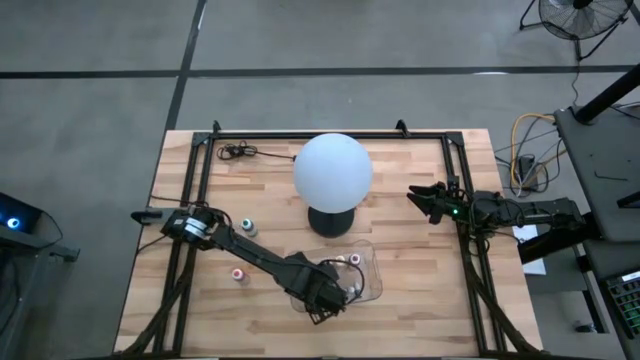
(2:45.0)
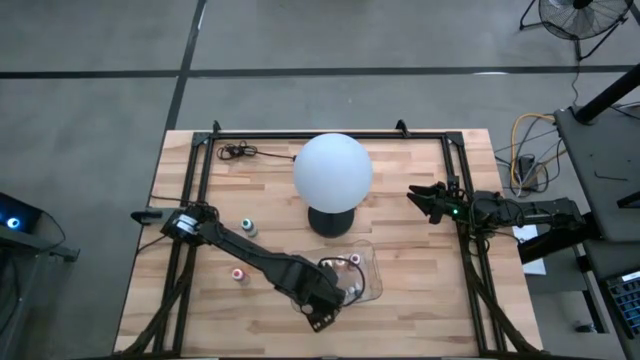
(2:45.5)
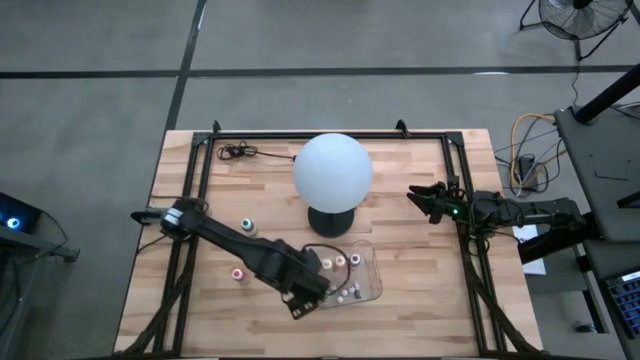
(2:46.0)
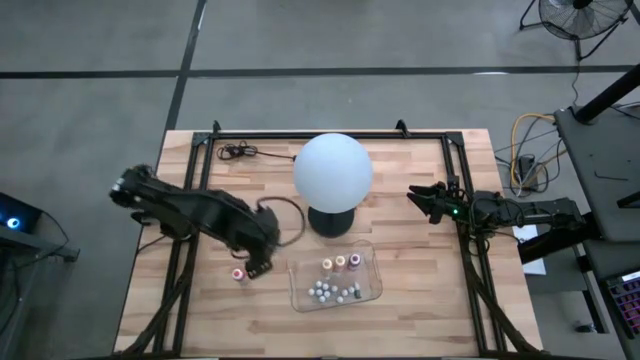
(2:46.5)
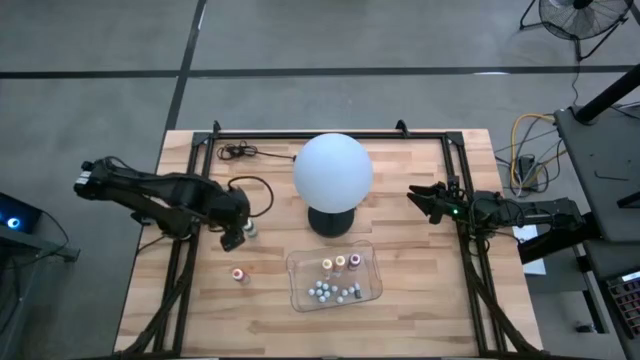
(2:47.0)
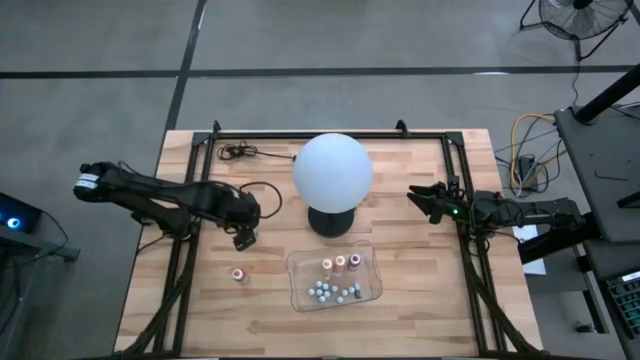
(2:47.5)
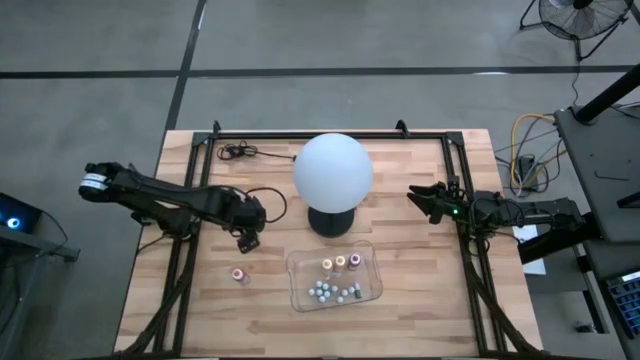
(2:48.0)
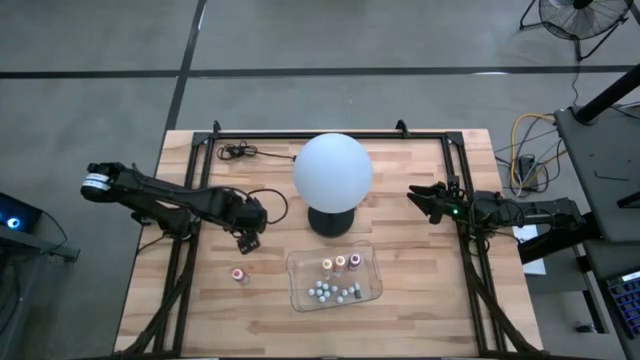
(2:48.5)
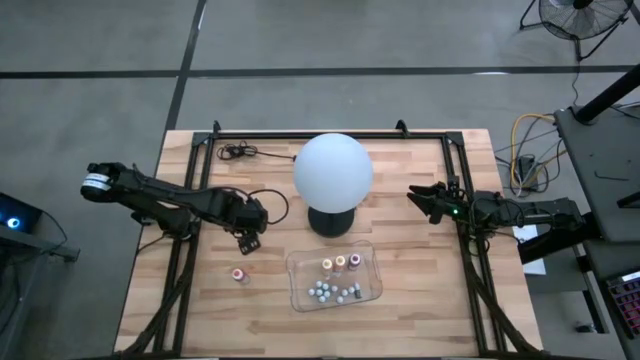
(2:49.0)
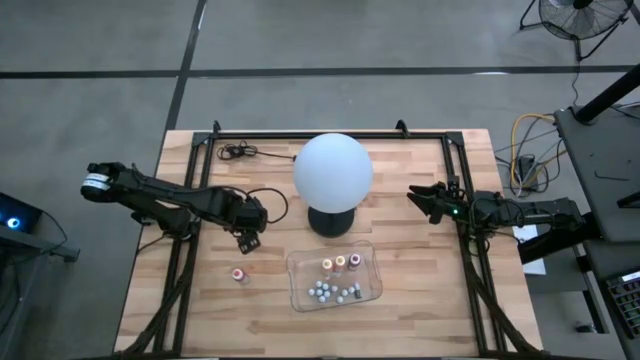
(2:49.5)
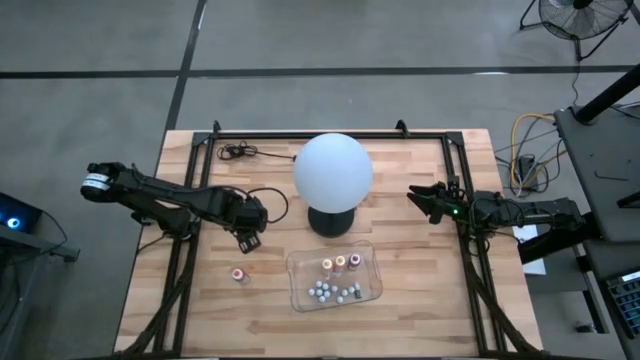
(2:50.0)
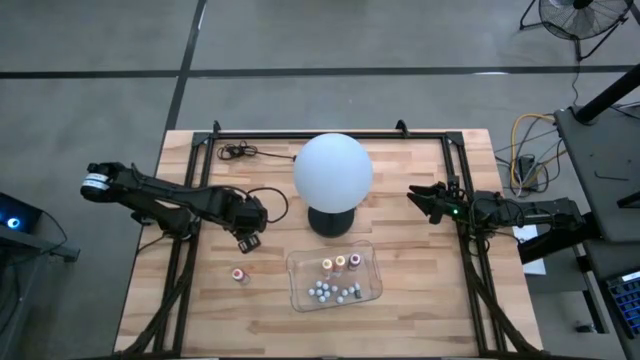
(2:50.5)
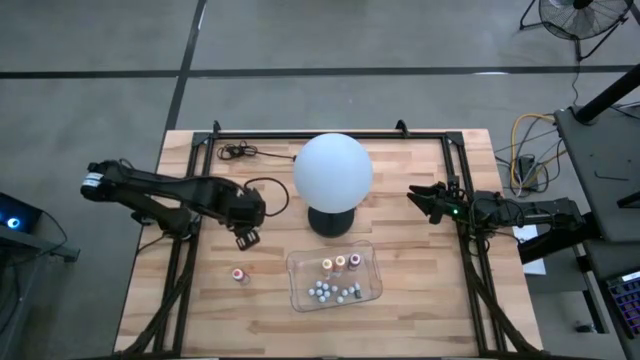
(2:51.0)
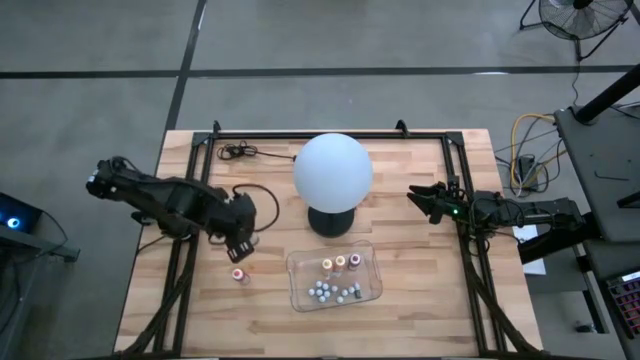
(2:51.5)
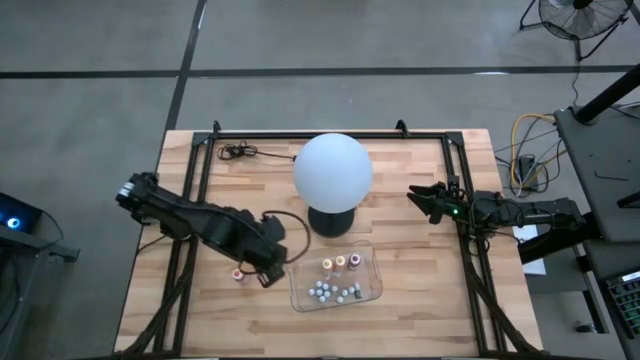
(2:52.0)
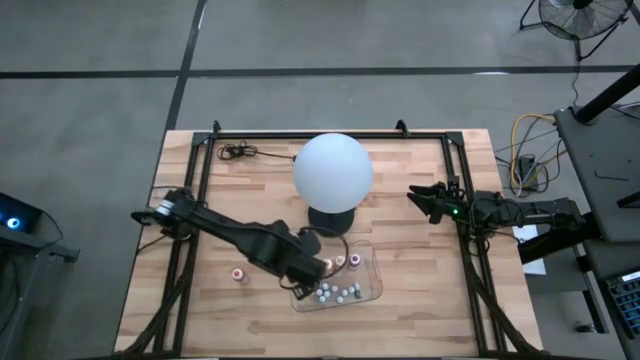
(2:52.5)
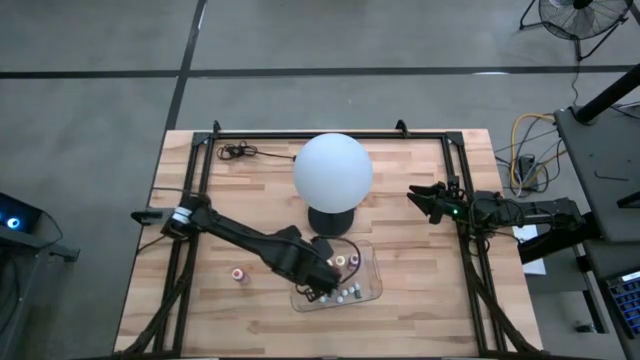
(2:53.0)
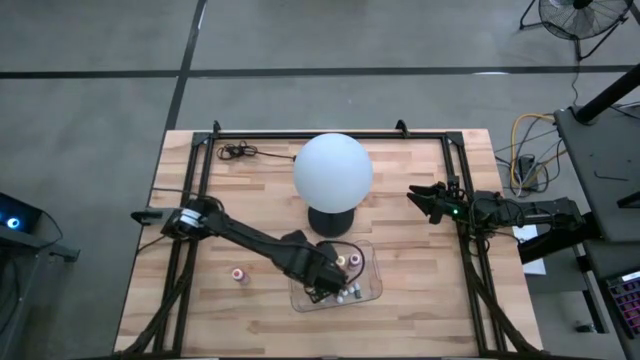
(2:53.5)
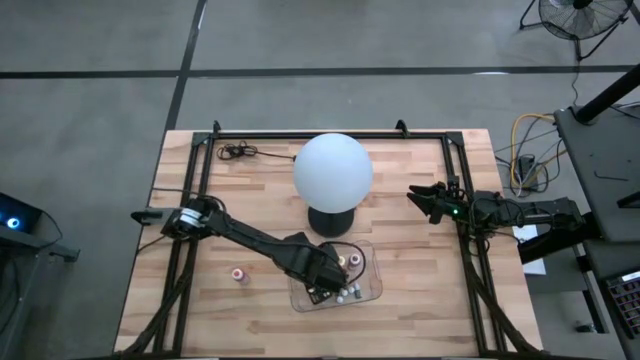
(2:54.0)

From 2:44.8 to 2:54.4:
Task: Pick & Place food coloring
Put the big green food coloring bottle into the transparent bin

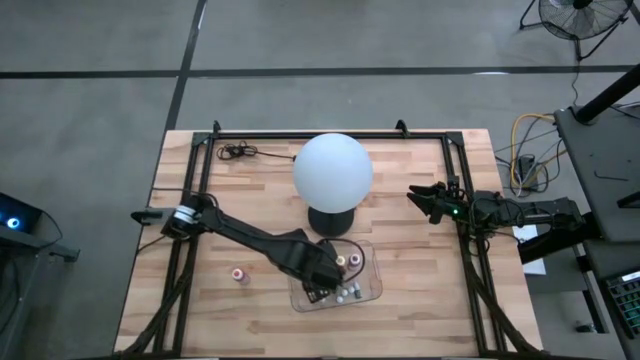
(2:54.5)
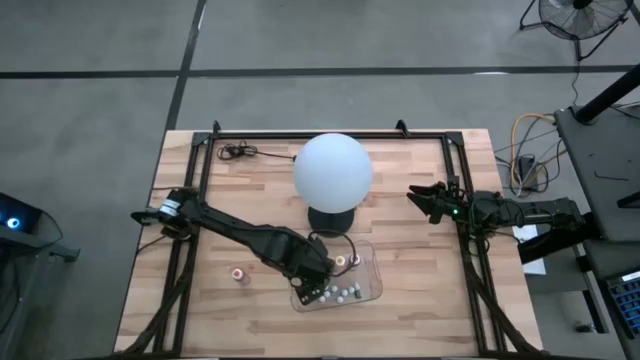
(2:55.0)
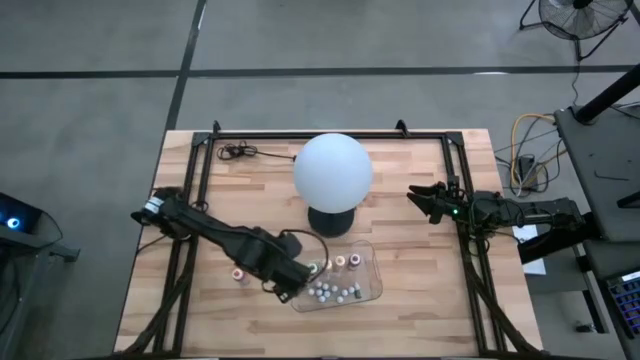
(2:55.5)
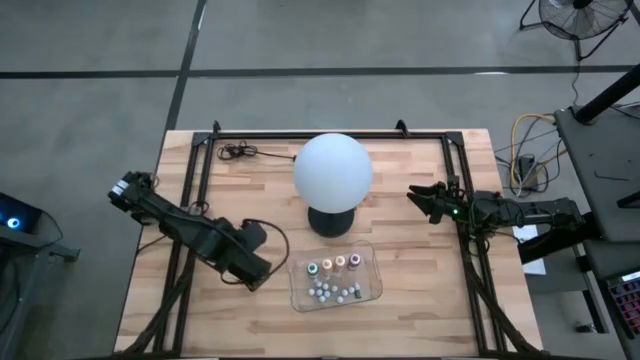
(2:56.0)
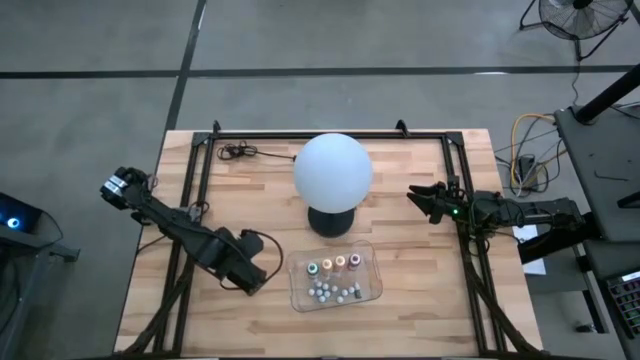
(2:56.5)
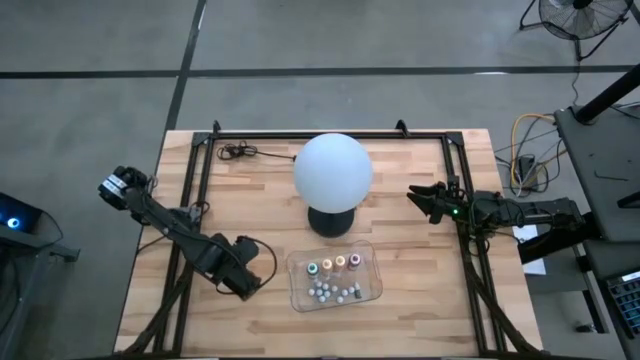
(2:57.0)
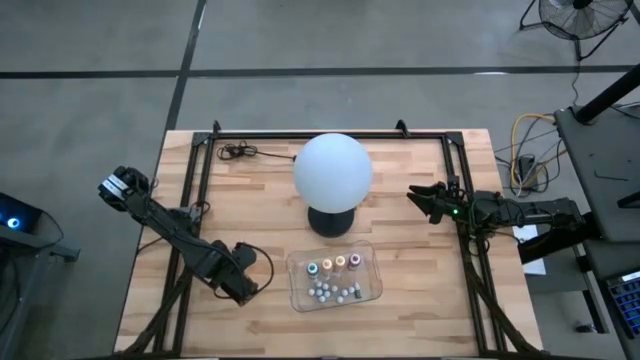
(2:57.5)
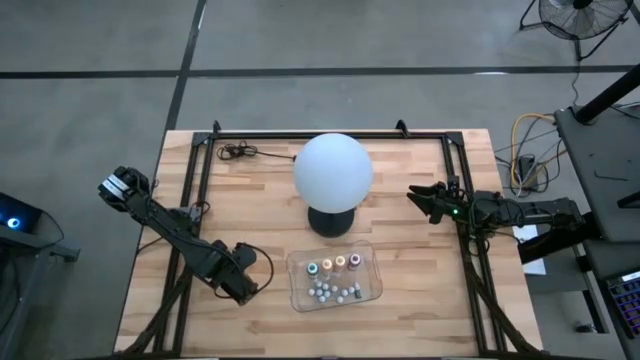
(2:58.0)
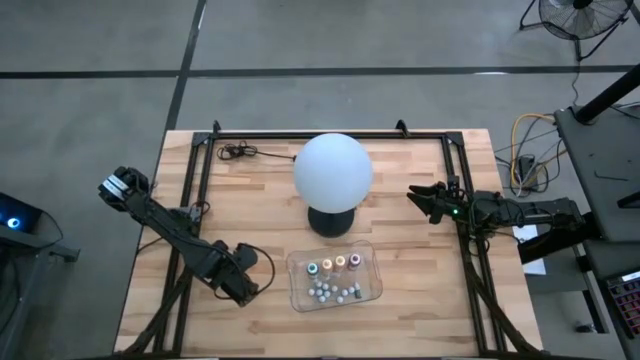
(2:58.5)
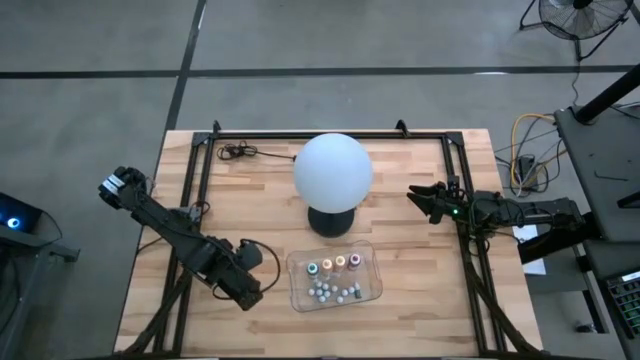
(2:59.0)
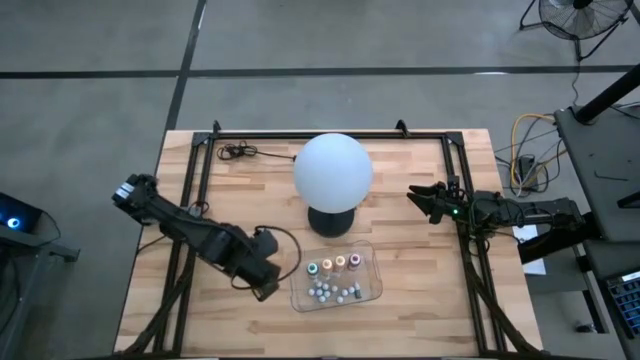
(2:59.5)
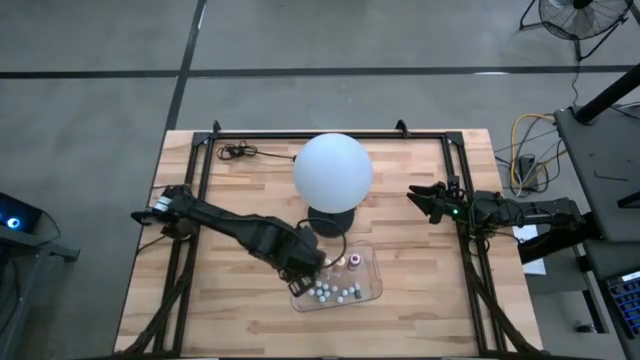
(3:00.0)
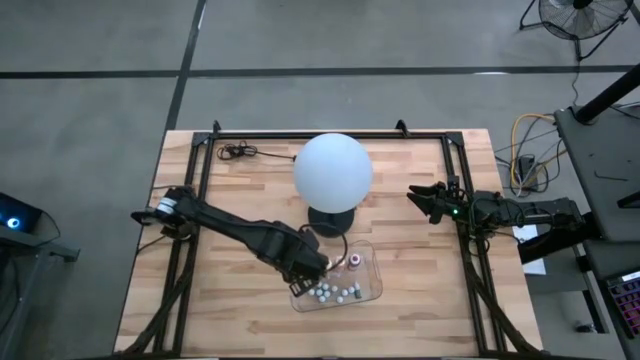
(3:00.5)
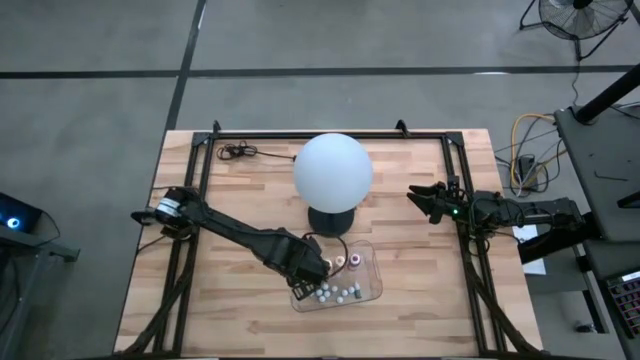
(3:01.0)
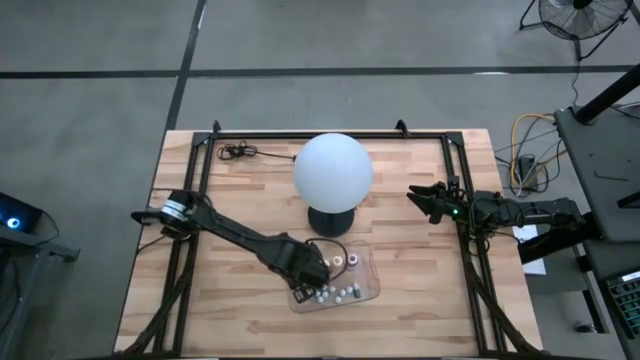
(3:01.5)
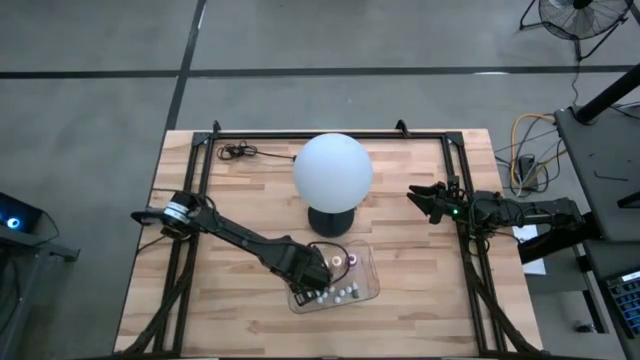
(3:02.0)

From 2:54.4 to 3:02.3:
Put the big orange food coloring bottle into the transparent bin

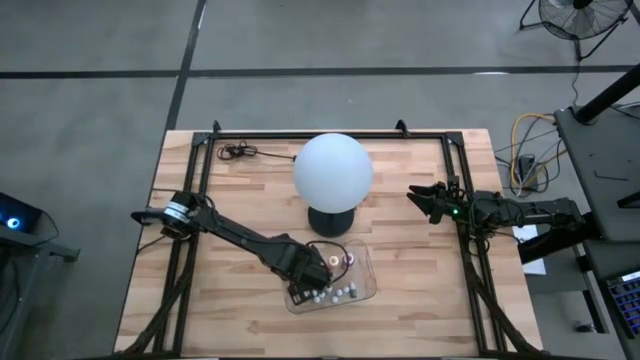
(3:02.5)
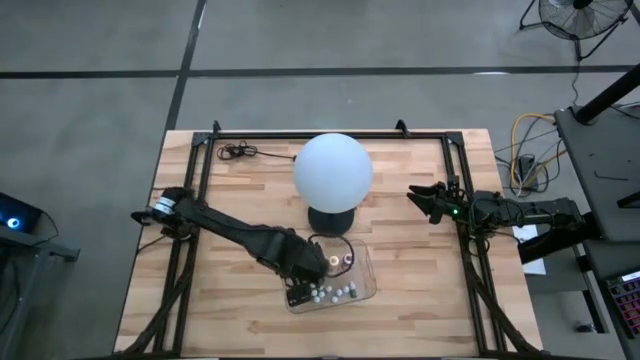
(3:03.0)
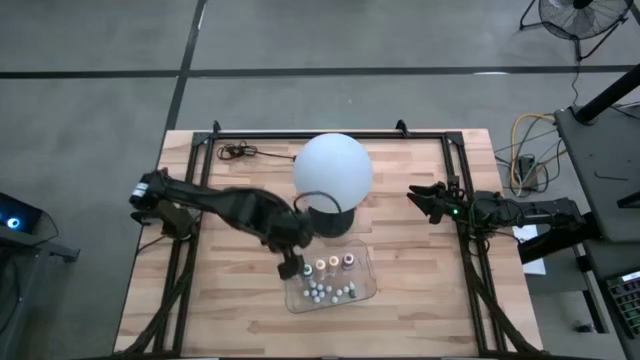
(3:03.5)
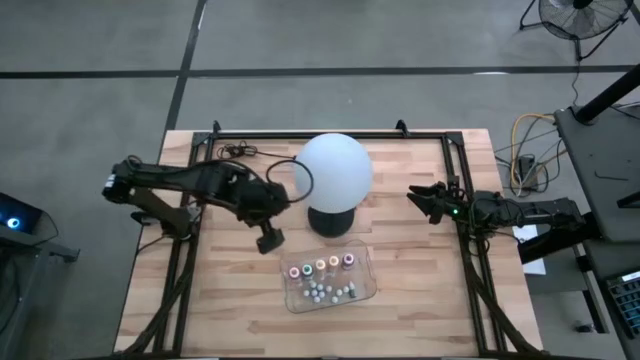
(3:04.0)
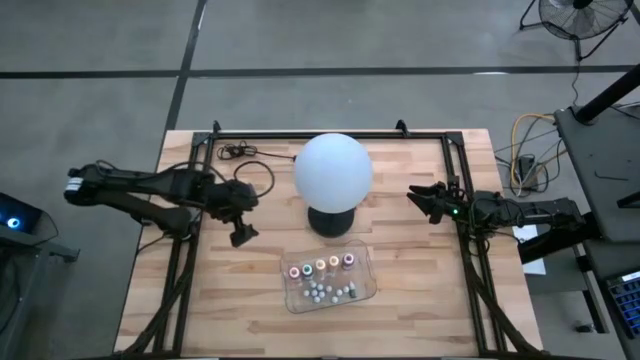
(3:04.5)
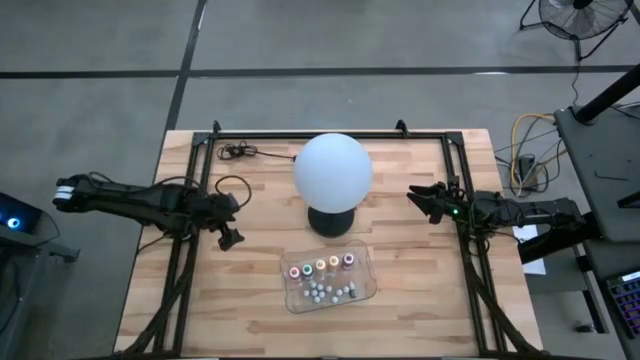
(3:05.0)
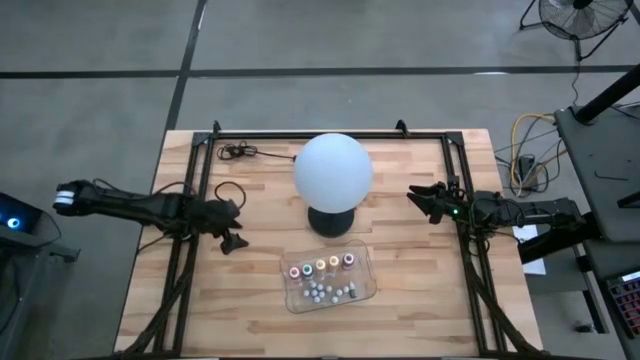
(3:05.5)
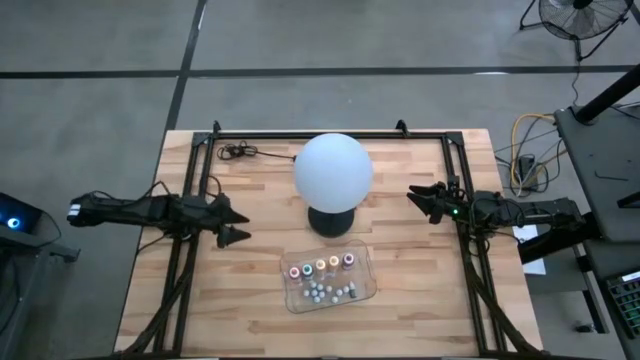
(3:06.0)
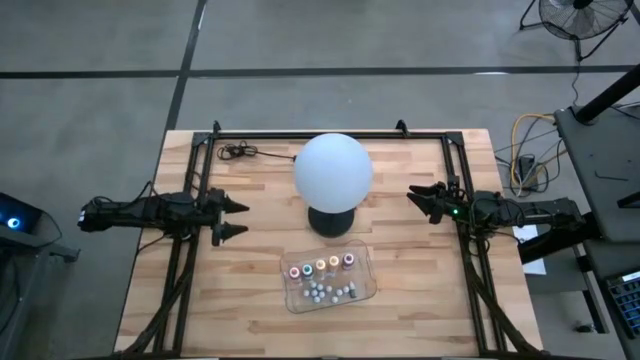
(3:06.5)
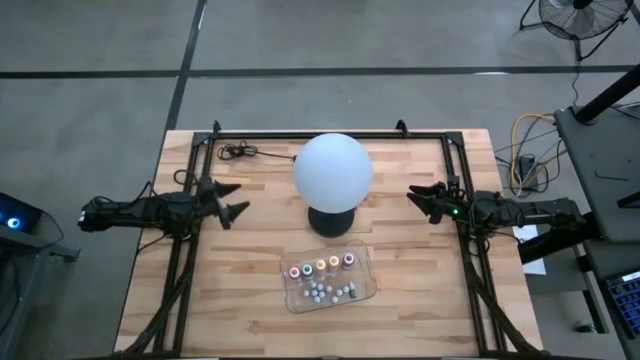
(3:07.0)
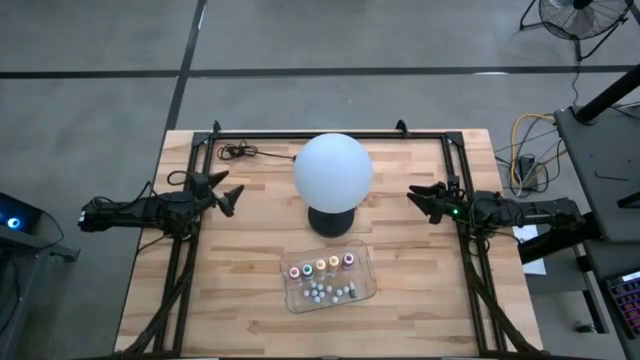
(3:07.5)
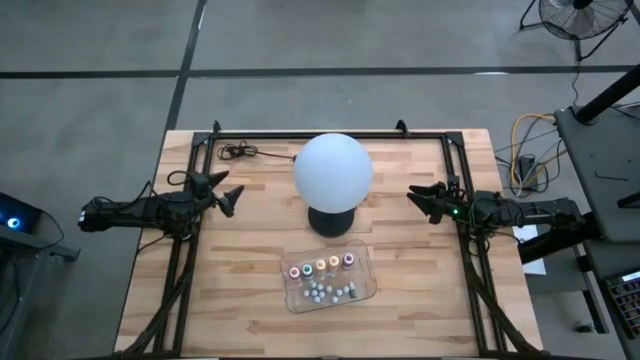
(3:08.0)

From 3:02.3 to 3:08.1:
Return to Home Position
